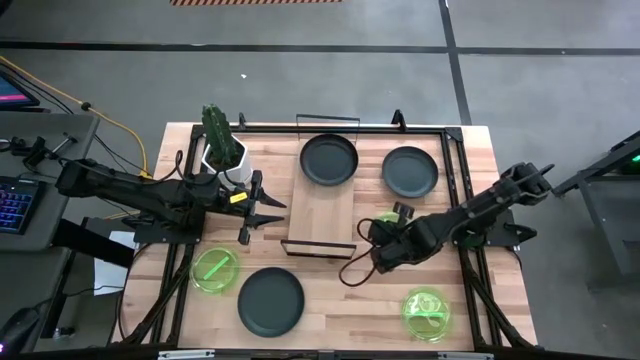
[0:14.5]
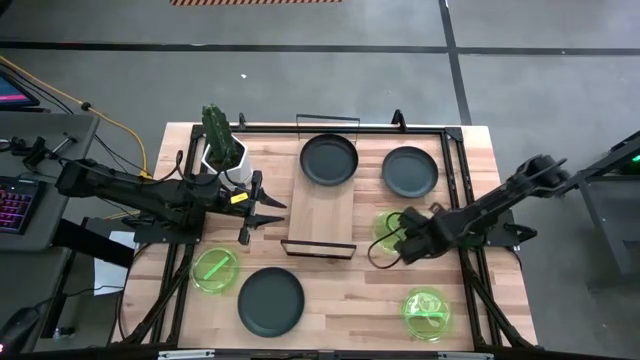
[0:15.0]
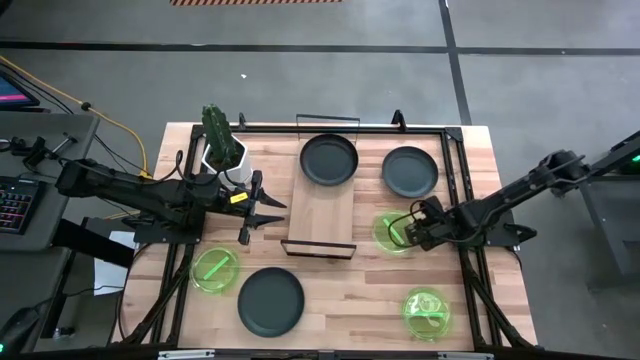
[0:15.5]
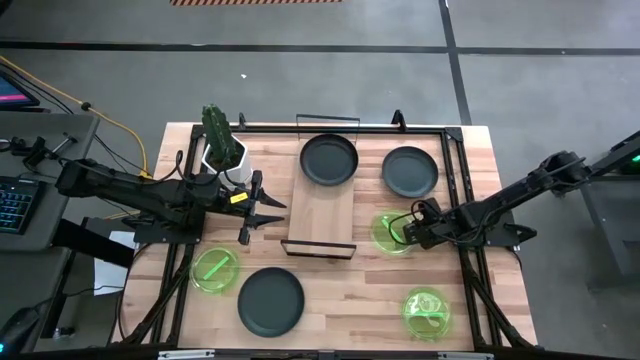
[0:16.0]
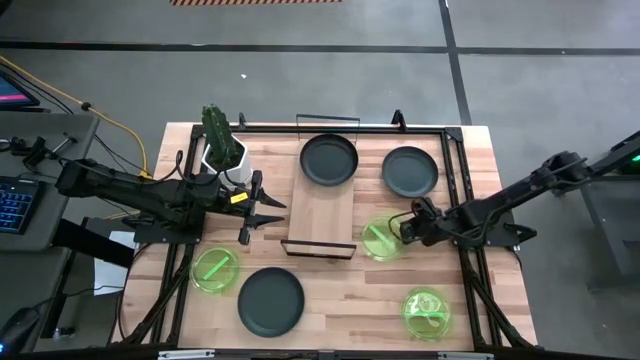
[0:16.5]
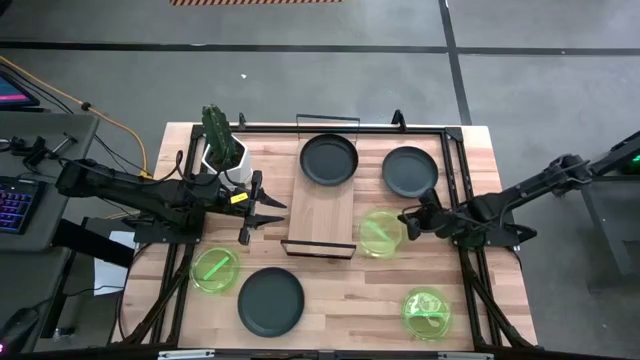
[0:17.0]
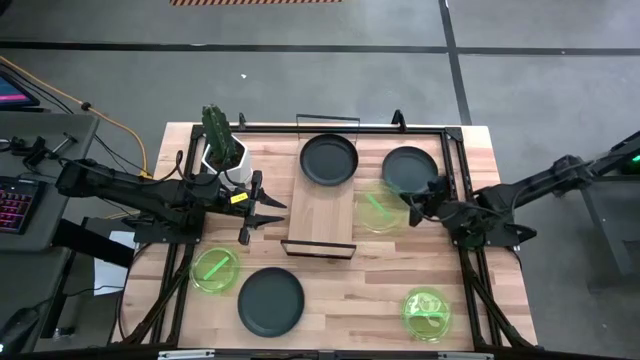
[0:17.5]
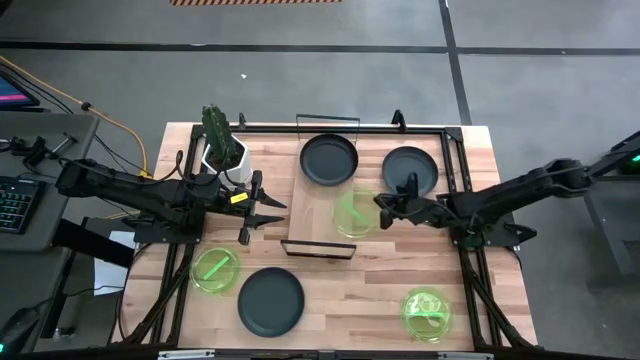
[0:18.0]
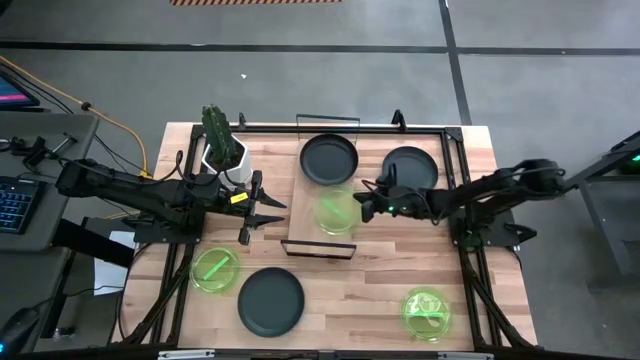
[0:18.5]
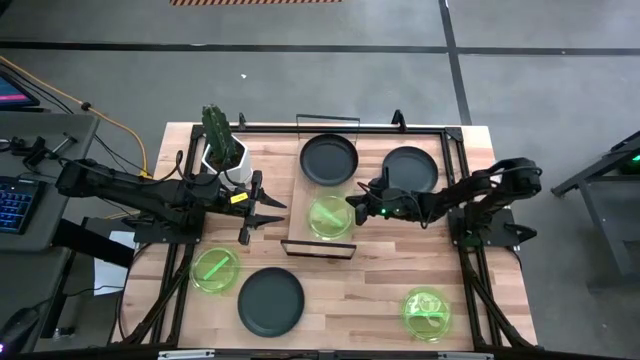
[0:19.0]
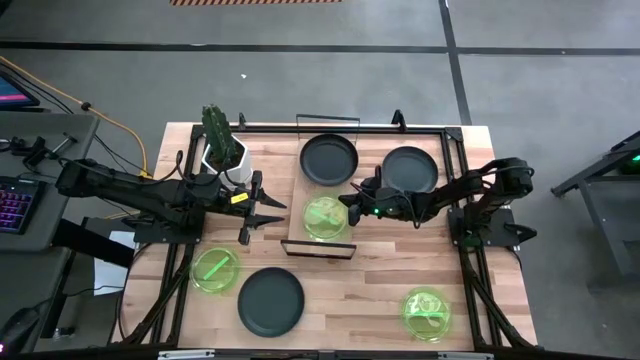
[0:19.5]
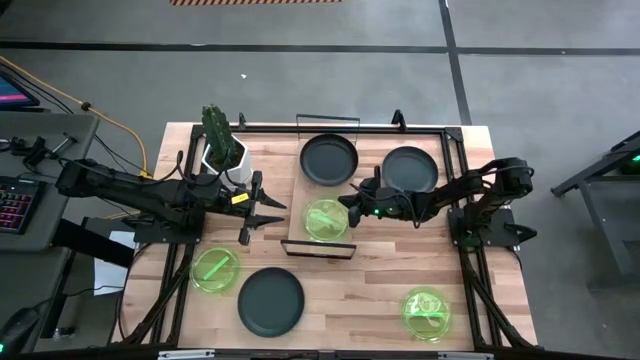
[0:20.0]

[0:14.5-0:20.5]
Task: Place and stack plates onto a shelf
Put the top right transparent green plate on the shelf

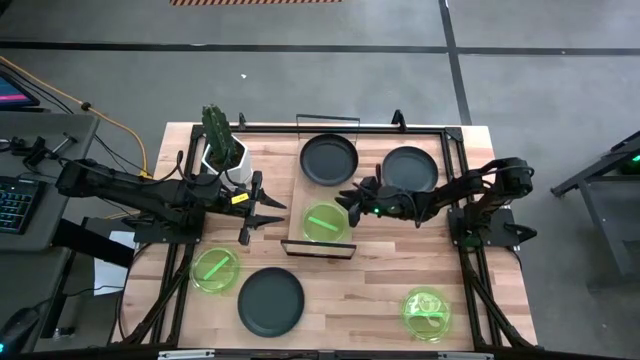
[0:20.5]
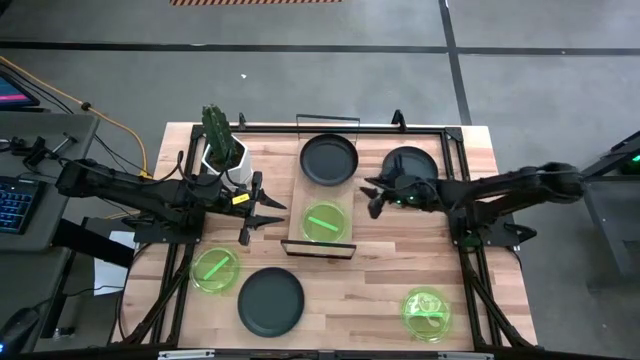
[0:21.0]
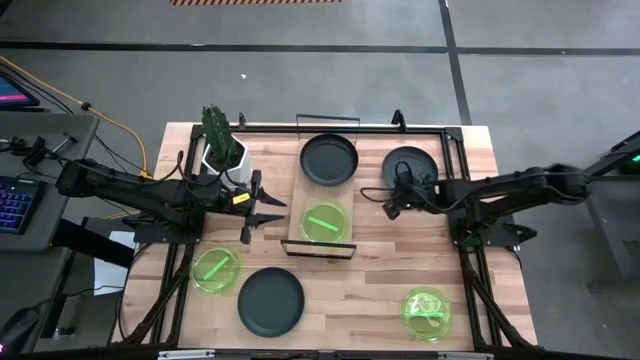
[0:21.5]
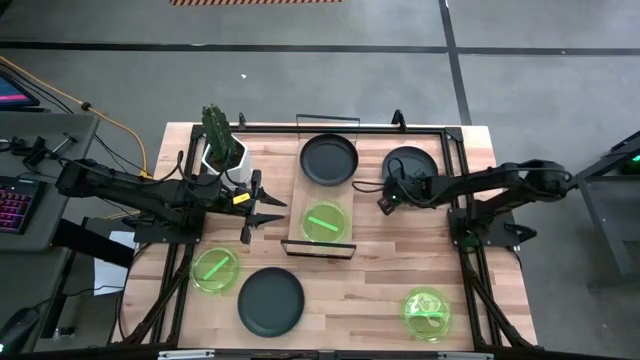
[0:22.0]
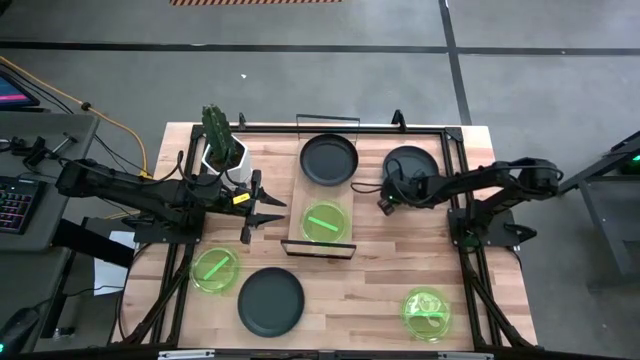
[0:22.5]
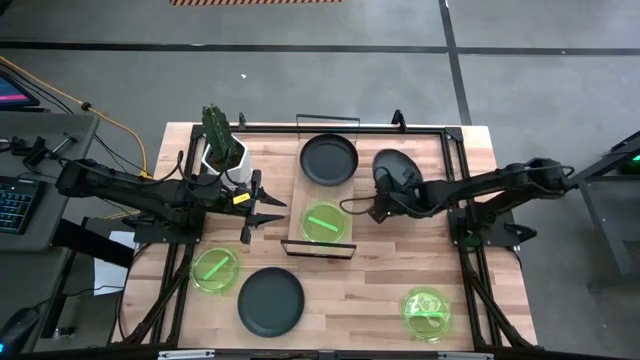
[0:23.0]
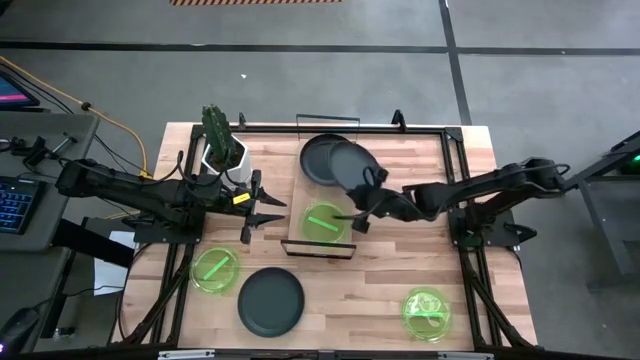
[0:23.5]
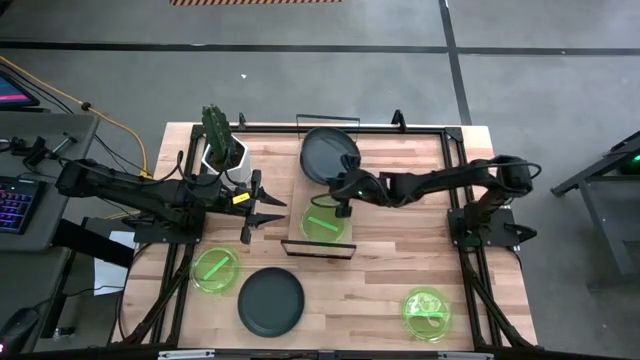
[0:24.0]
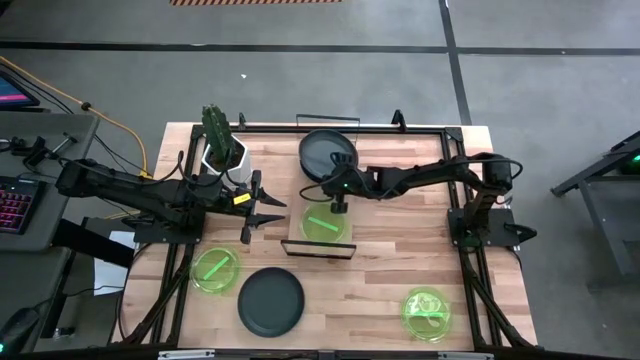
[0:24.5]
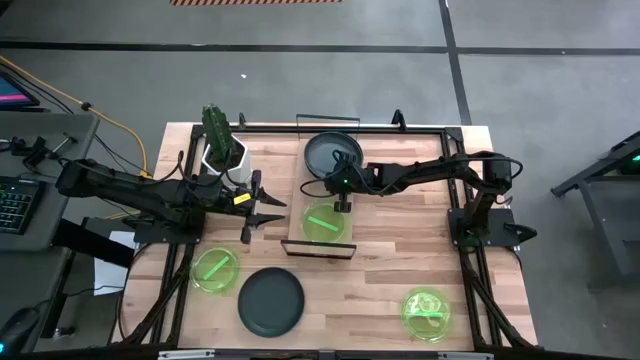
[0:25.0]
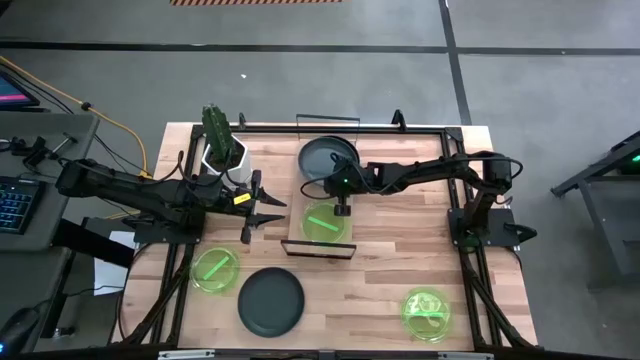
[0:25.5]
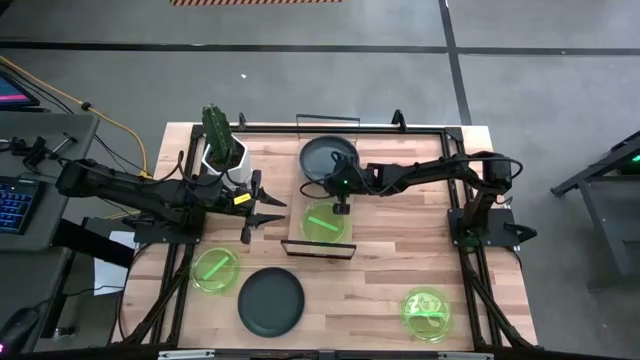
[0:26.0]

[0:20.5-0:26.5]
Stack the top black plate on top of the other black plate on the shelf

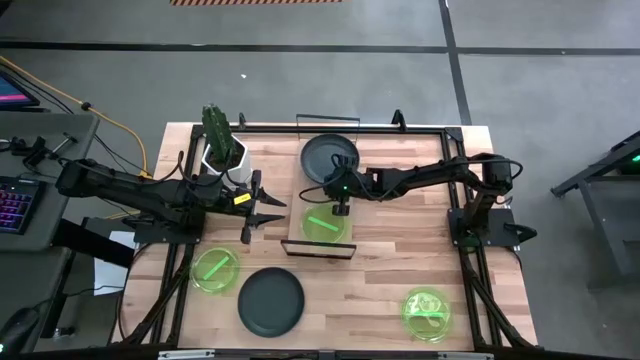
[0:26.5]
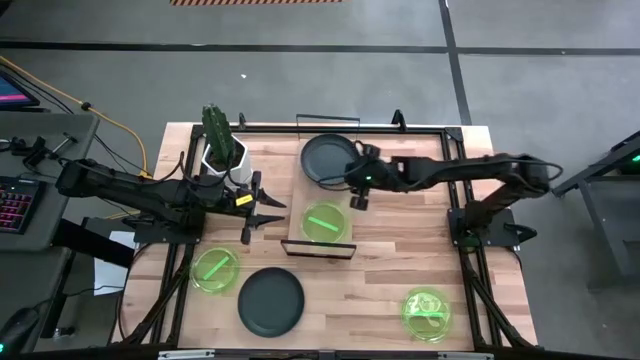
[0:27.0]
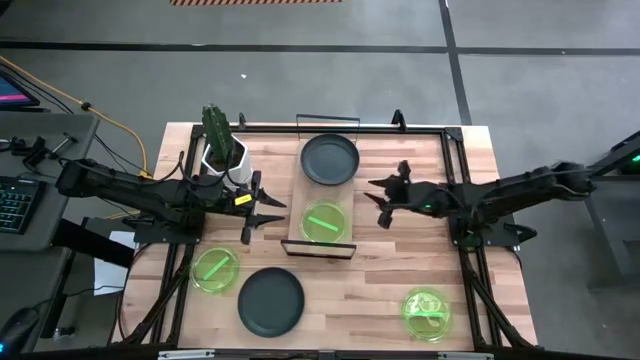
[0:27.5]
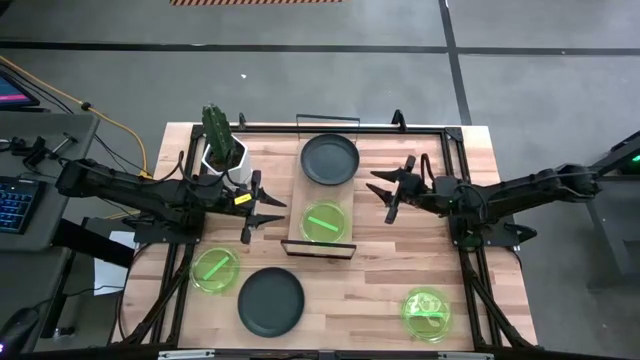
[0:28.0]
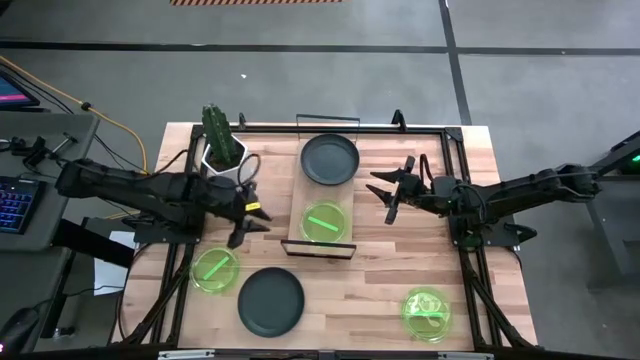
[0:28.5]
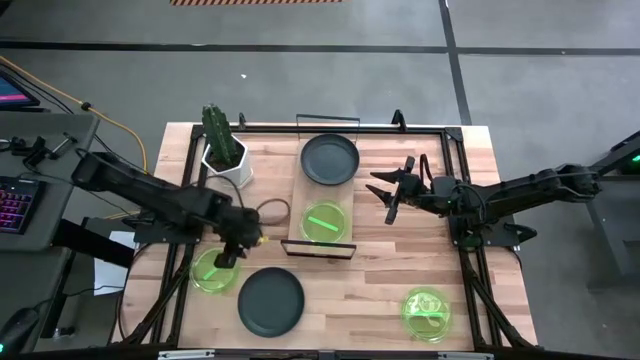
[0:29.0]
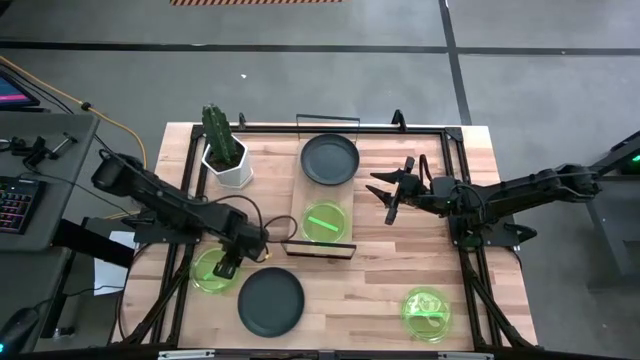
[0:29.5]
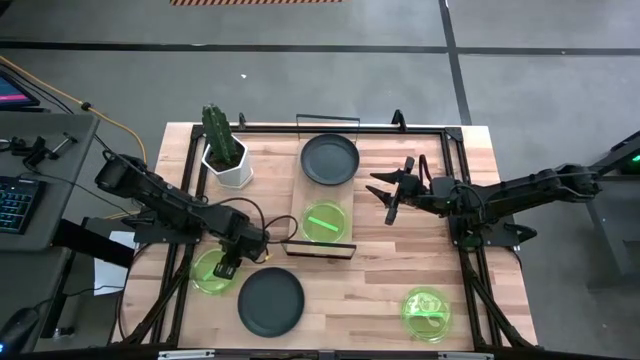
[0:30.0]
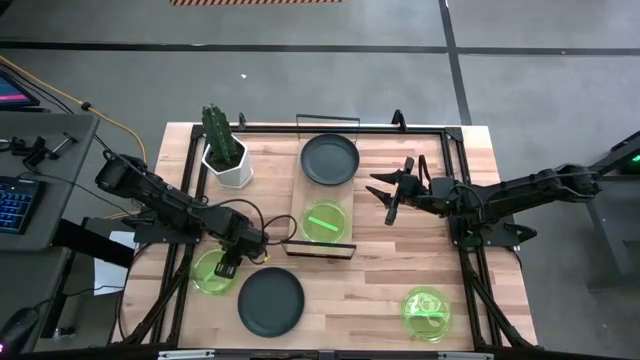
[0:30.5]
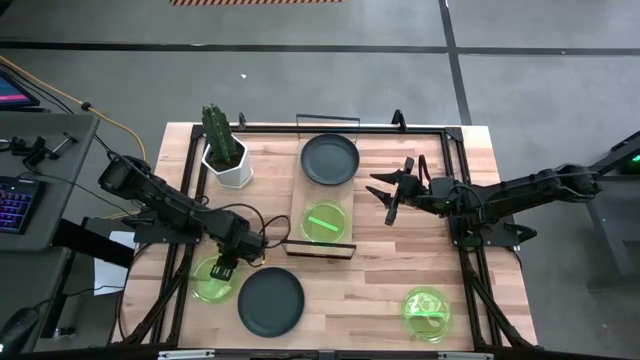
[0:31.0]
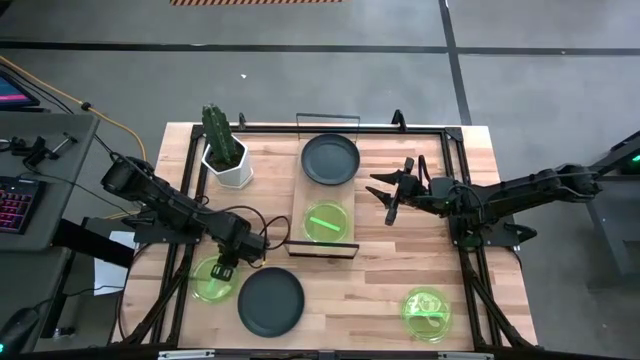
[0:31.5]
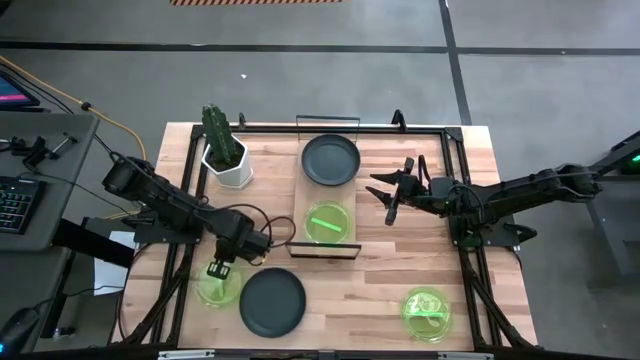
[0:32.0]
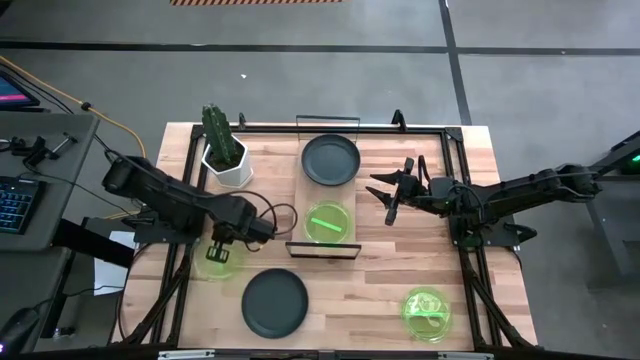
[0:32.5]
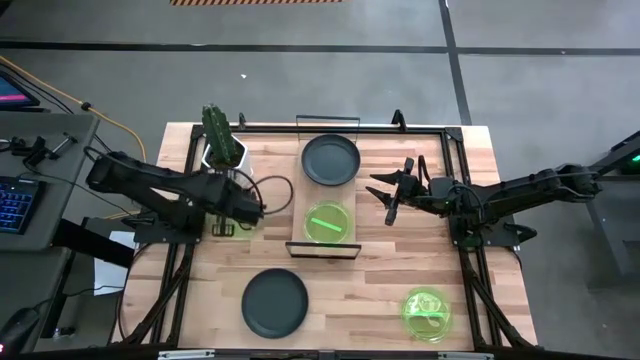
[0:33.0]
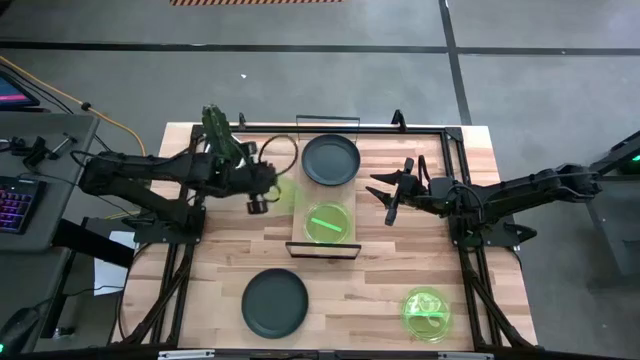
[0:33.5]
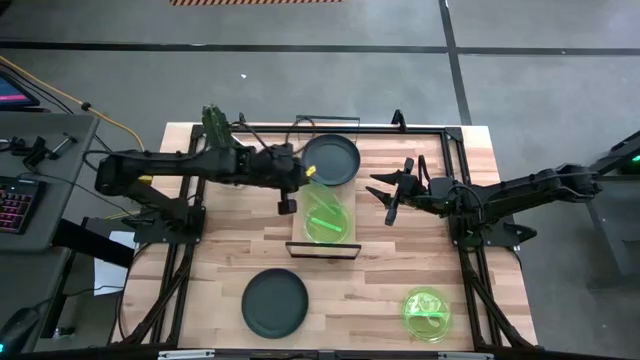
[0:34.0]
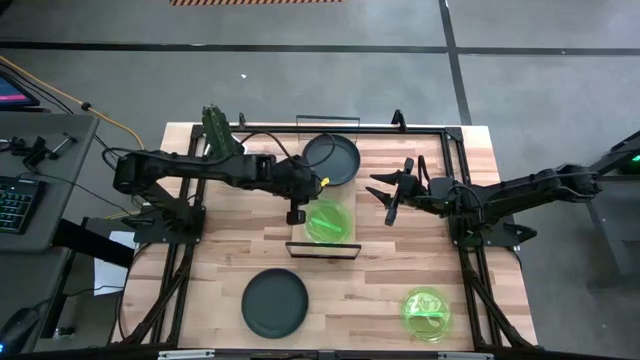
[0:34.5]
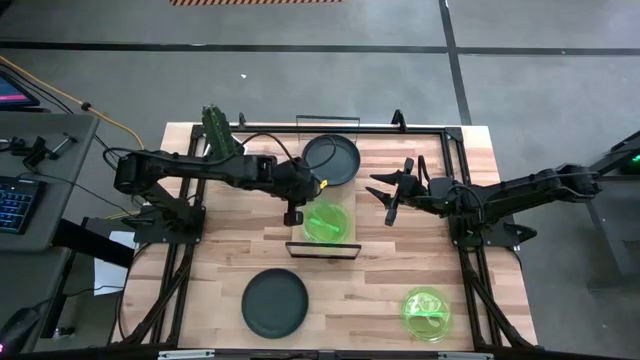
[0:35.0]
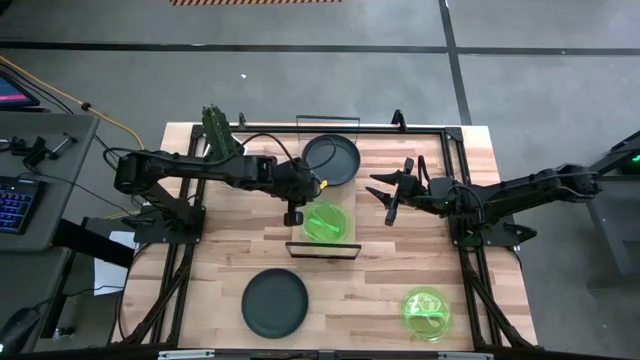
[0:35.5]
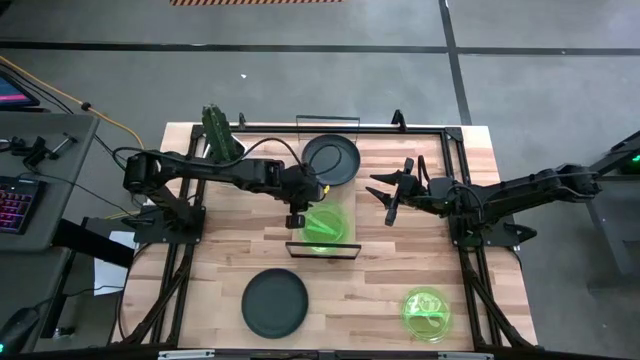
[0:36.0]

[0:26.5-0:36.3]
Stack the left transparent green plate on top of the other transparent green plate on the shelf
